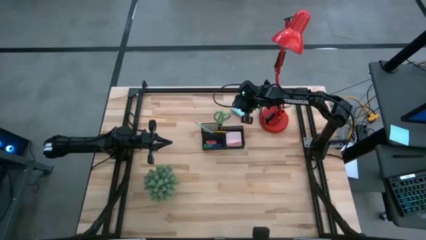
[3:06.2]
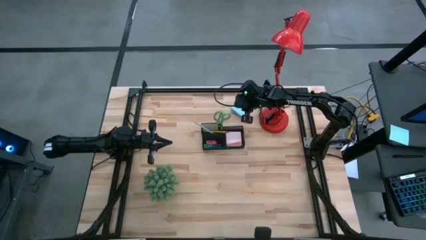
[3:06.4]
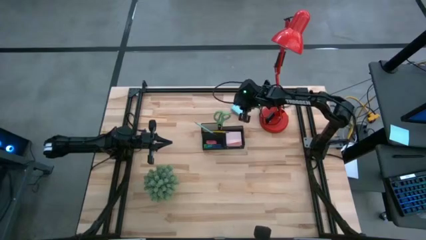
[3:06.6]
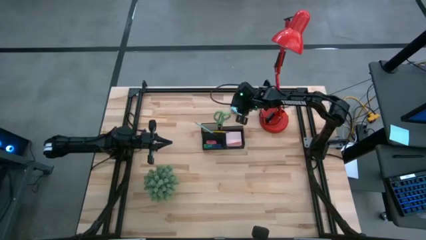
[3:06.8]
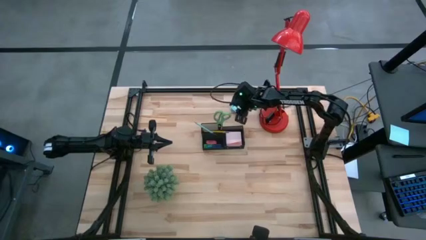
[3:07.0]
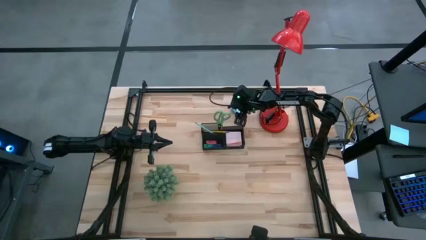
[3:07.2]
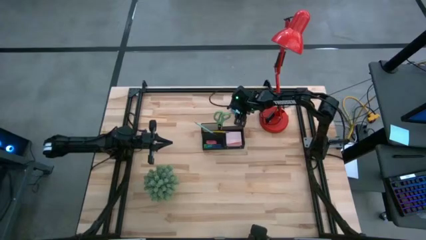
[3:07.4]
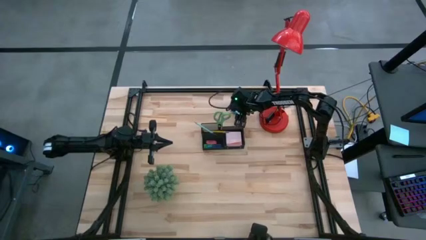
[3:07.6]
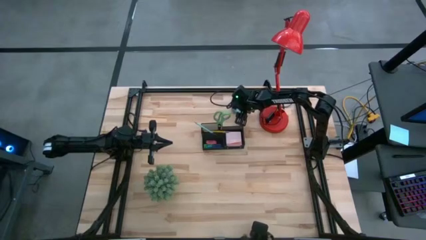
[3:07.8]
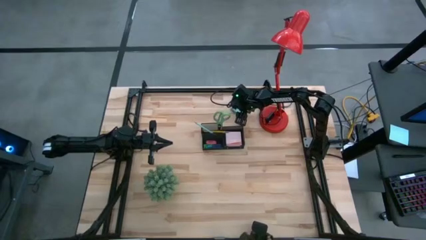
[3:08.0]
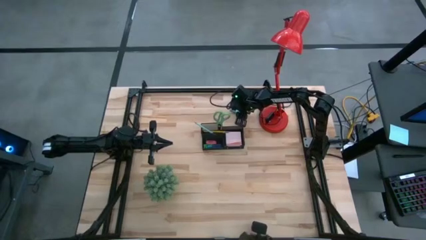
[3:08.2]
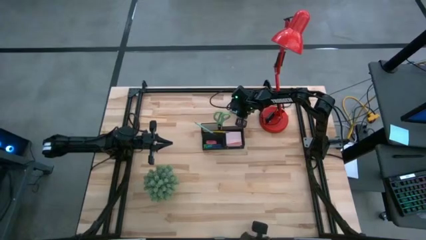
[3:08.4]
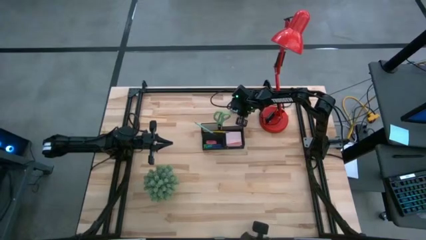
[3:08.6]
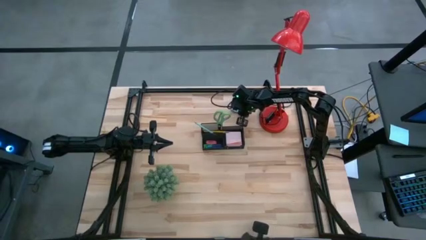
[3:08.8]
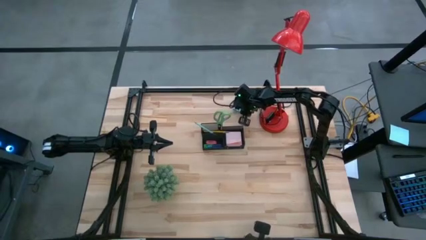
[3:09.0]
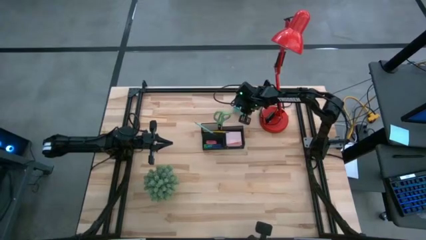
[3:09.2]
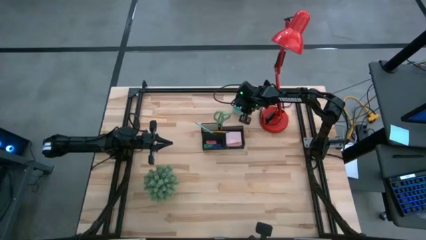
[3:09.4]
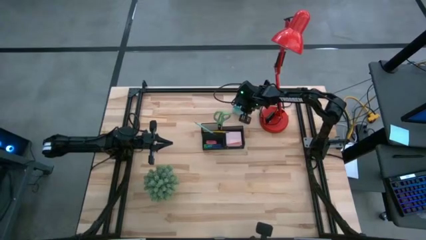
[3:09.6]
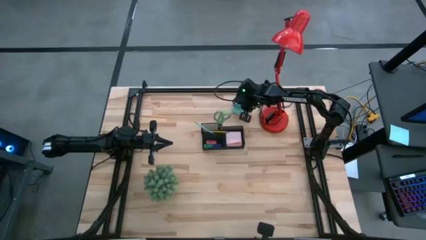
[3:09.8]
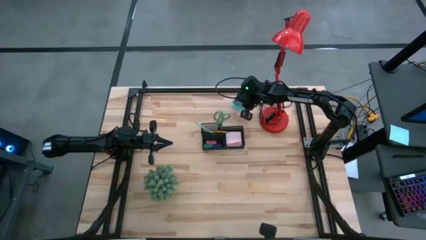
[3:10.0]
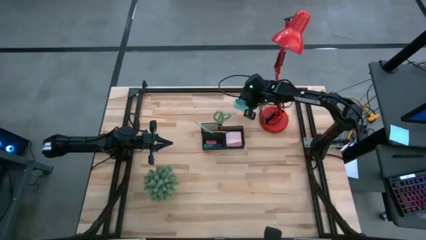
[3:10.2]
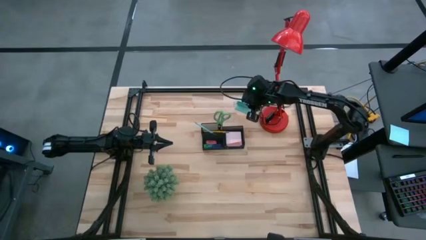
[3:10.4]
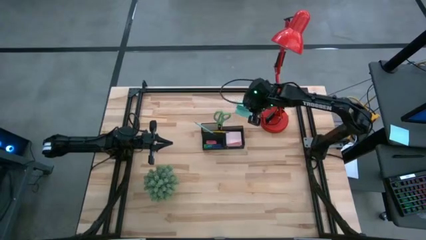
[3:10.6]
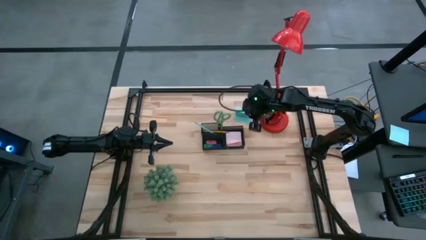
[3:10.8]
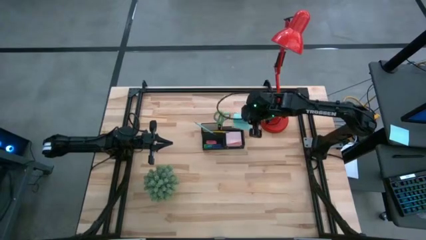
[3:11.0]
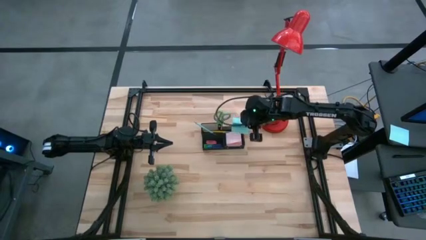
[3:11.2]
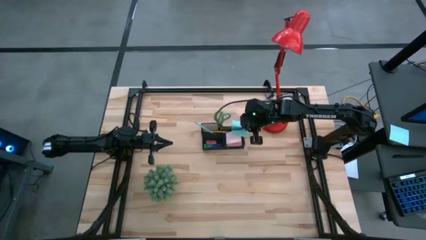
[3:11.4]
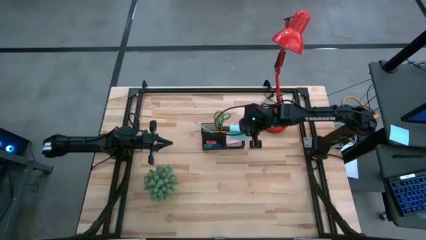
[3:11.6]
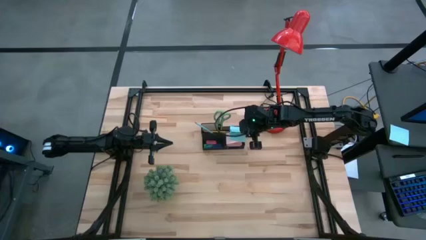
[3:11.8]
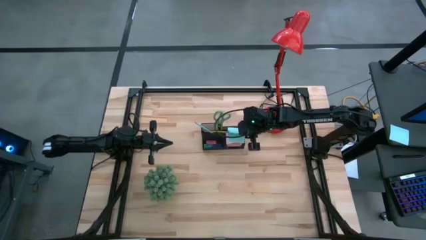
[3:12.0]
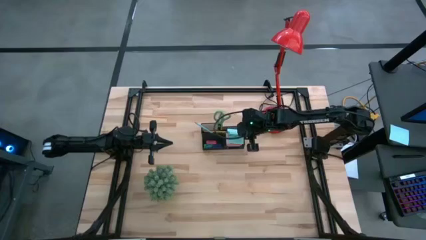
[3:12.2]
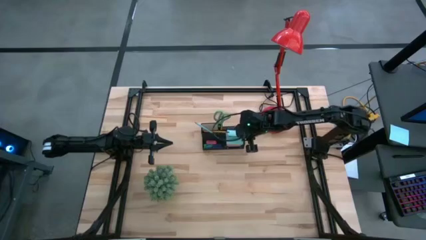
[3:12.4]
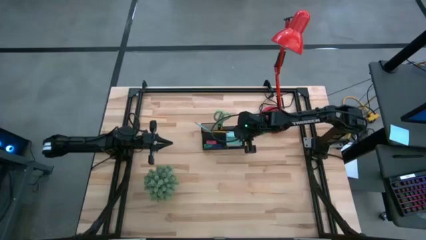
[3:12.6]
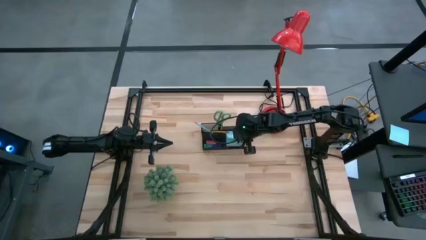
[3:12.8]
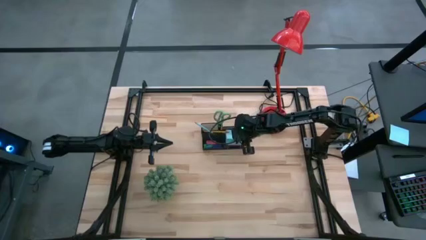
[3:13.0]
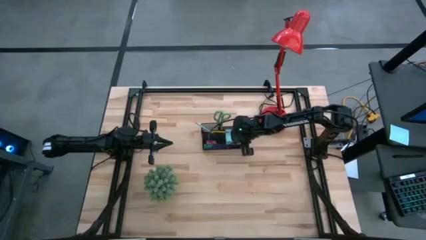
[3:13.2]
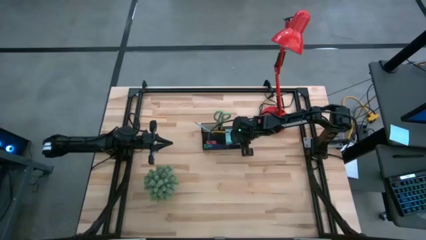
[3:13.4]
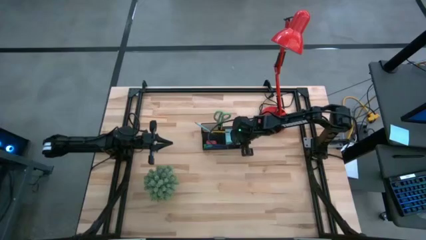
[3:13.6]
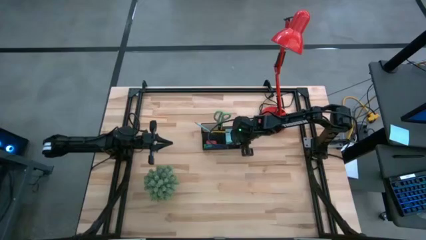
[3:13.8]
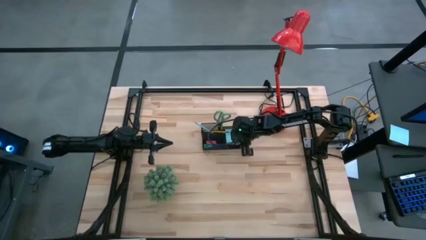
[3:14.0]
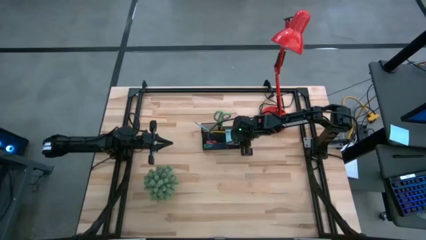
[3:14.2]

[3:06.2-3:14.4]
Task: Pick and place office supplies into organizer
Put the blue sticky notes into the black desk organizer

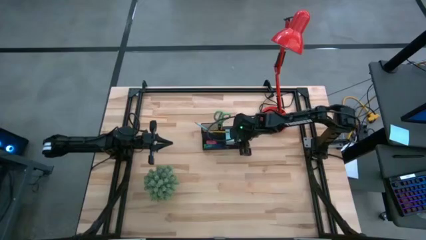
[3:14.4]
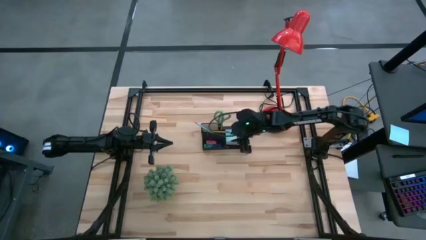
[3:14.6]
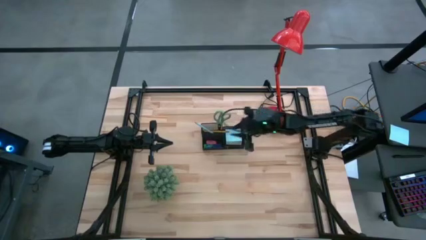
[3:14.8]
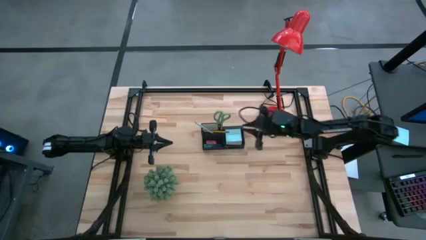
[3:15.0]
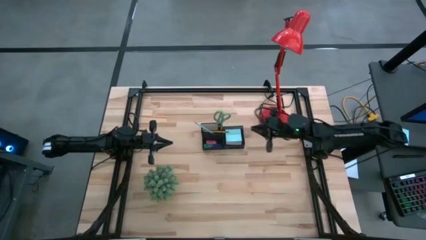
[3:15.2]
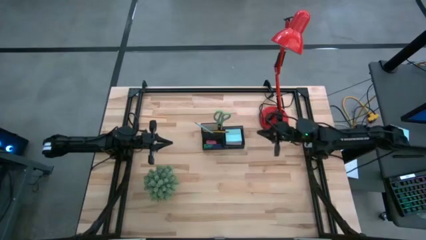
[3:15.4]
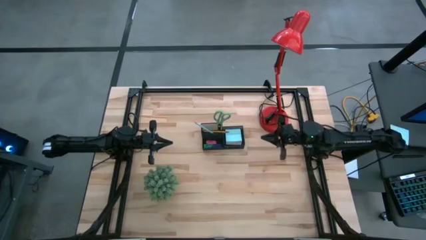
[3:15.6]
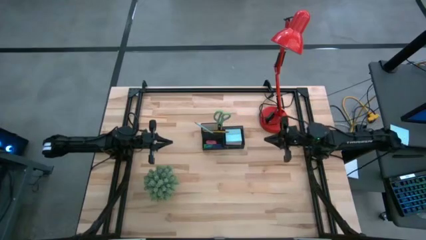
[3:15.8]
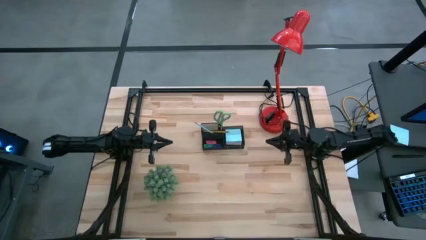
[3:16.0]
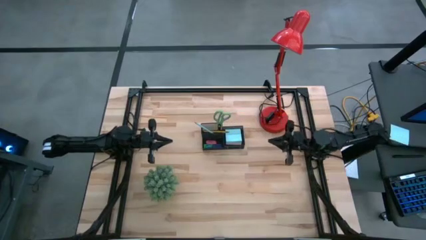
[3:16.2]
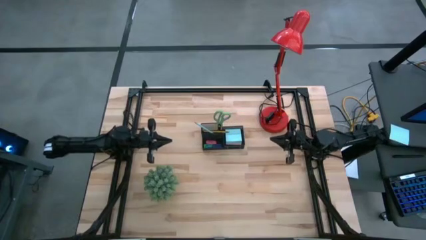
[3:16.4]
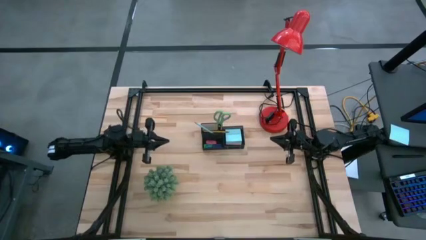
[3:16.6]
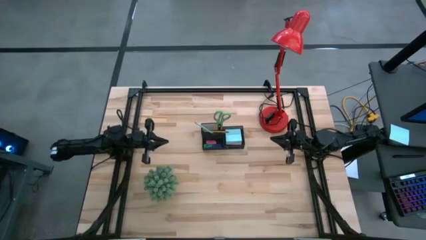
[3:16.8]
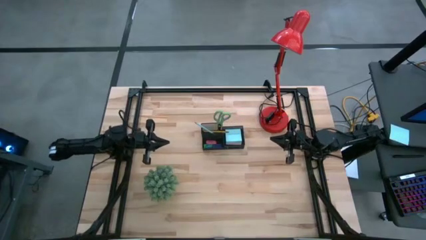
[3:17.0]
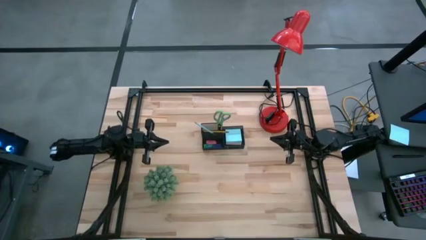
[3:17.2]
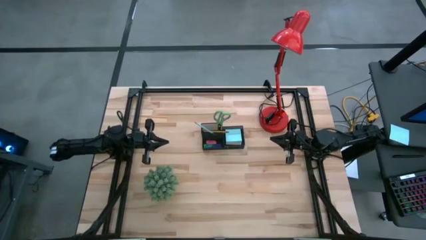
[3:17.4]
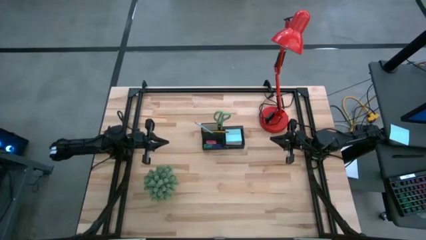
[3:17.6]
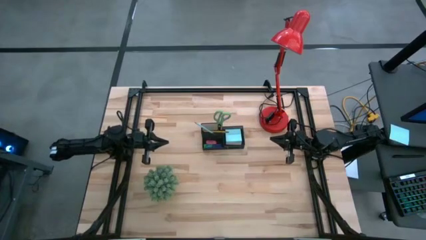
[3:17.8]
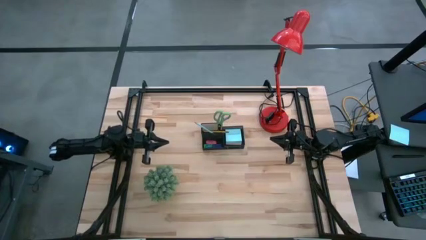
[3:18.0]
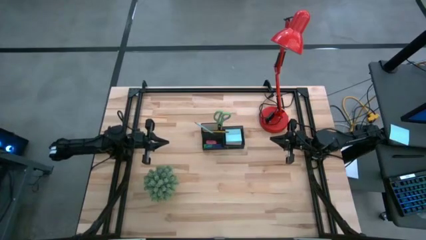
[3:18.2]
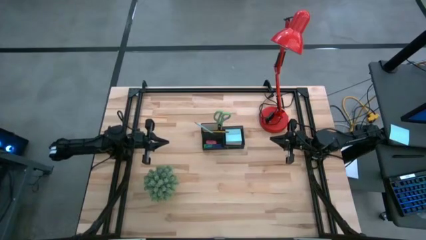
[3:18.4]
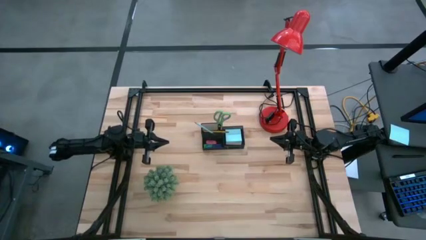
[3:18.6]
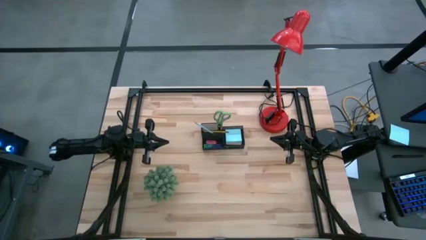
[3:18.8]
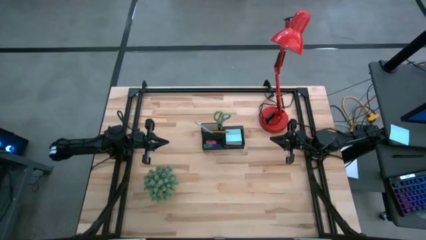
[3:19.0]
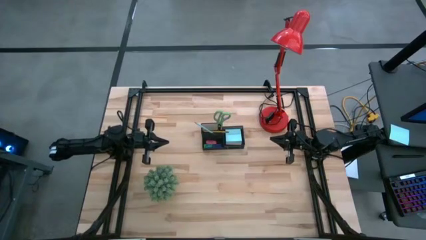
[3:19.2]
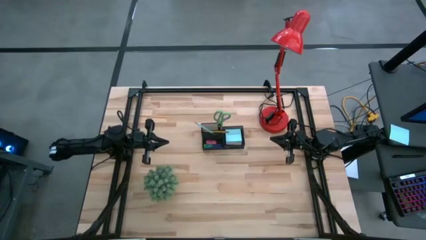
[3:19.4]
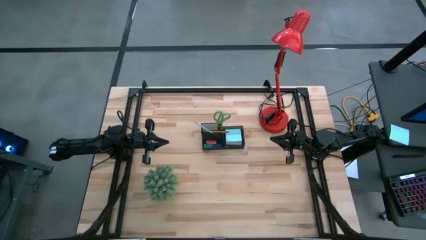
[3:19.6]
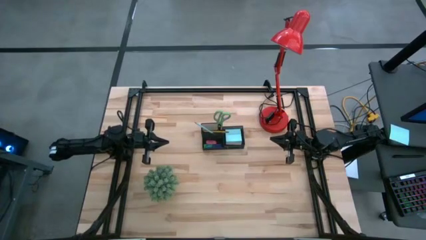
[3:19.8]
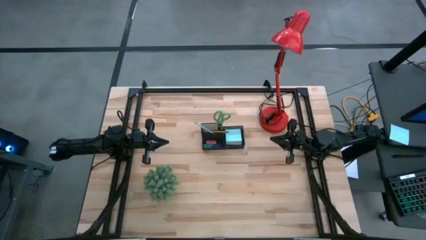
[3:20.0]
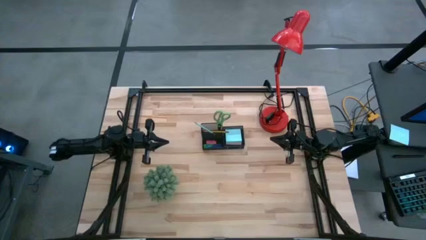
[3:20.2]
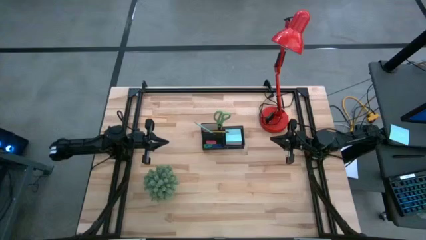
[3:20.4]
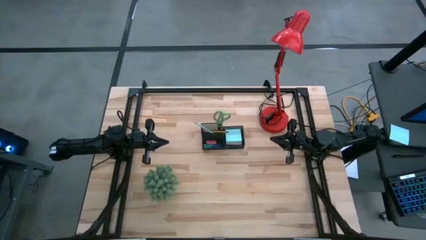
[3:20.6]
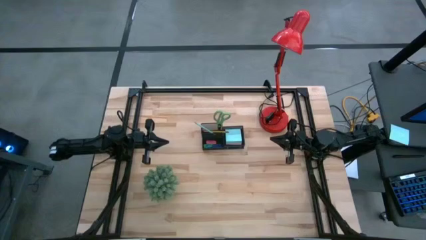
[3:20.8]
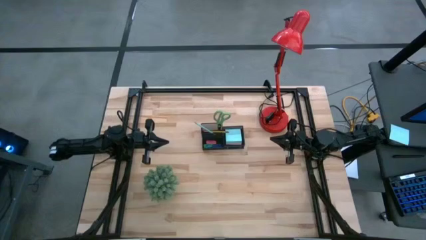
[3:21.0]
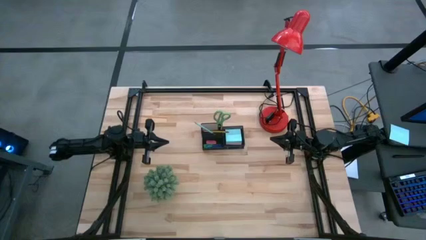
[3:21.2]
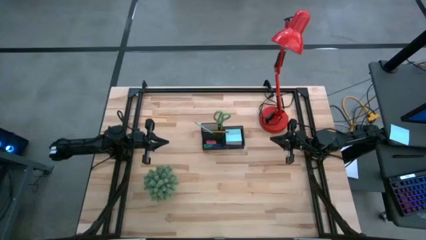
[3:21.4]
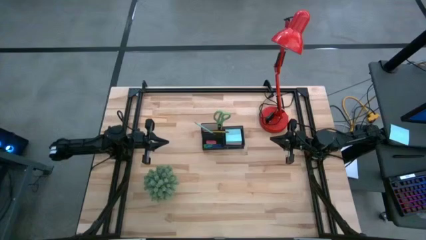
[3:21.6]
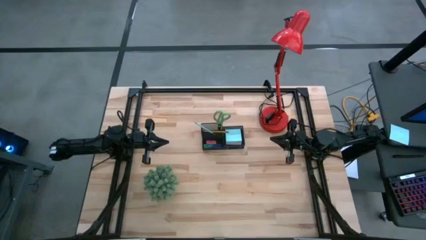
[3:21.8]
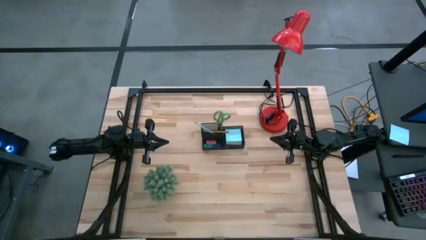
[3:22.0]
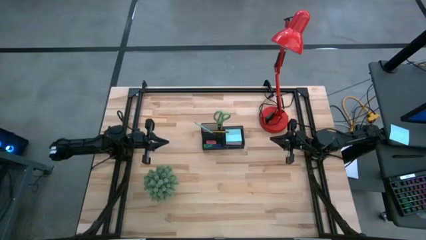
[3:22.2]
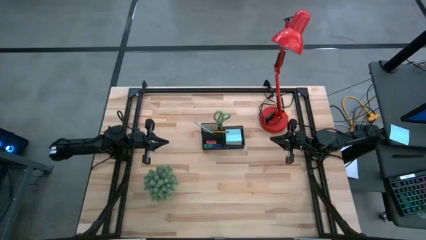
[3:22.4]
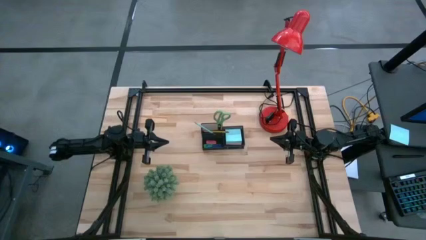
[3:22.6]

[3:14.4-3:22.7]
Return to Home Position
